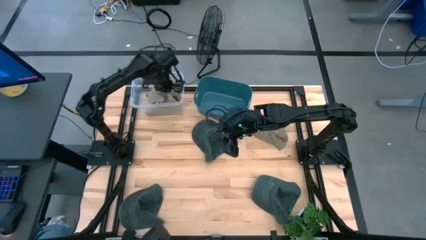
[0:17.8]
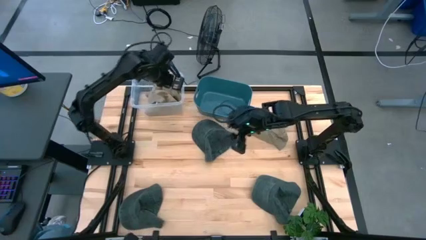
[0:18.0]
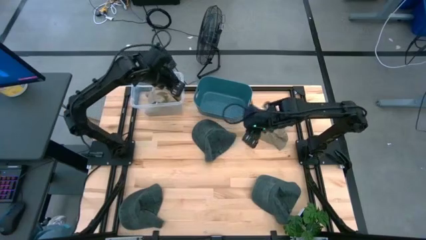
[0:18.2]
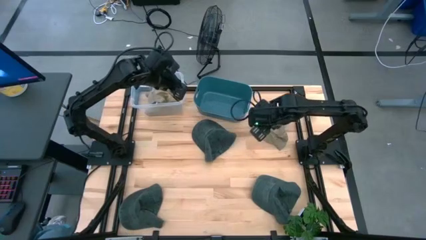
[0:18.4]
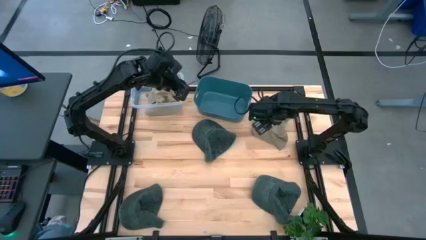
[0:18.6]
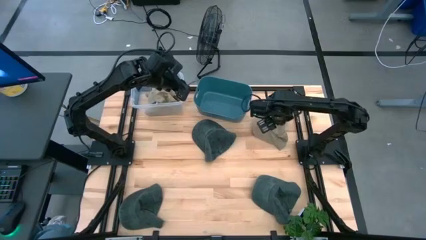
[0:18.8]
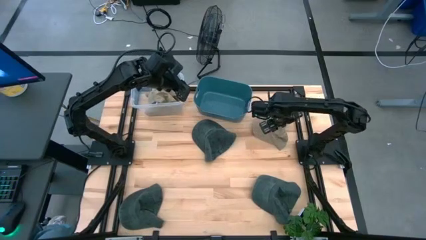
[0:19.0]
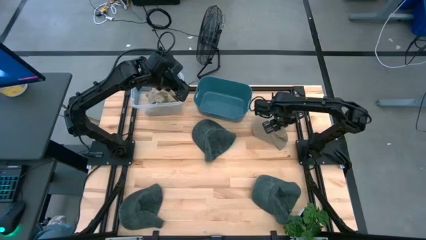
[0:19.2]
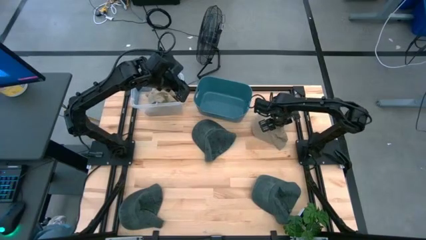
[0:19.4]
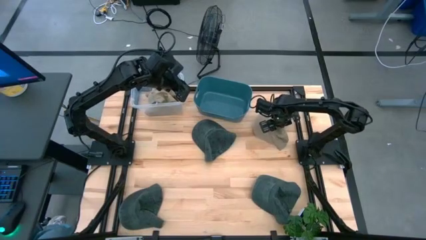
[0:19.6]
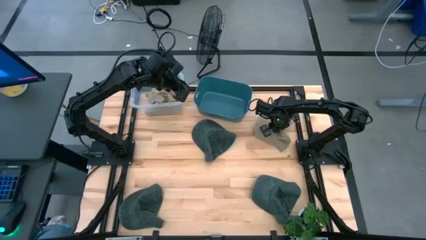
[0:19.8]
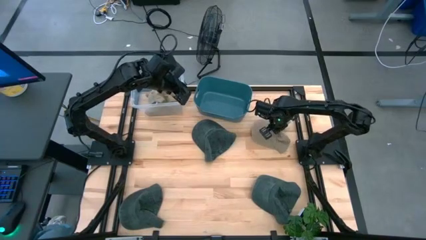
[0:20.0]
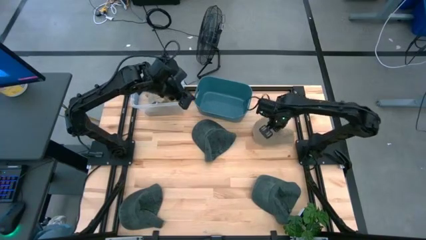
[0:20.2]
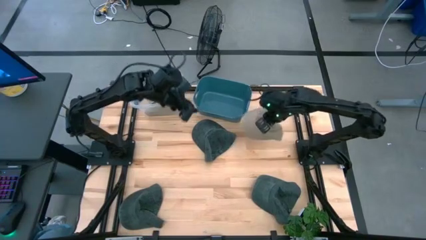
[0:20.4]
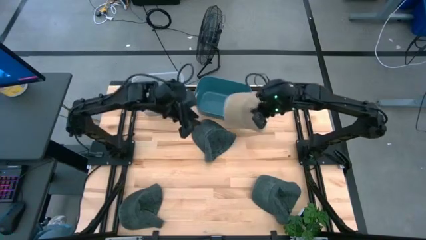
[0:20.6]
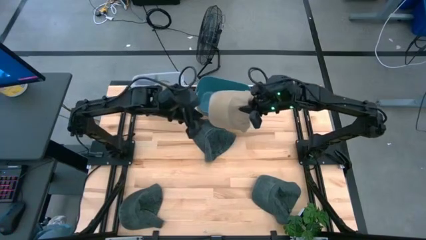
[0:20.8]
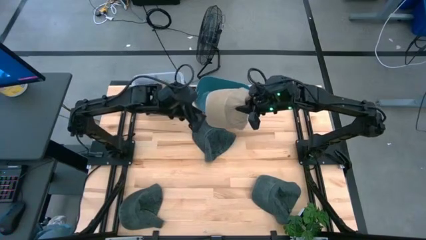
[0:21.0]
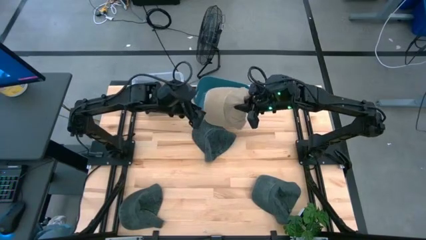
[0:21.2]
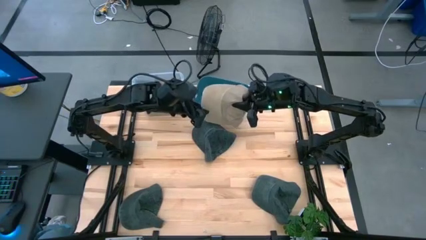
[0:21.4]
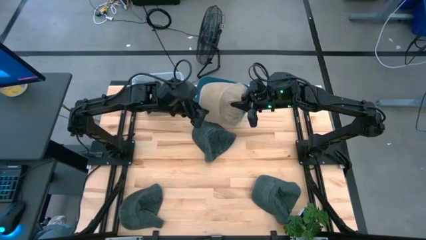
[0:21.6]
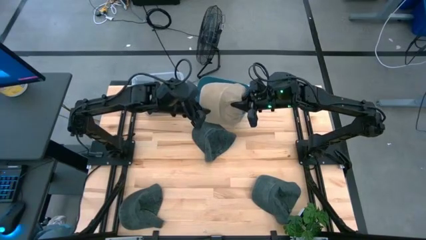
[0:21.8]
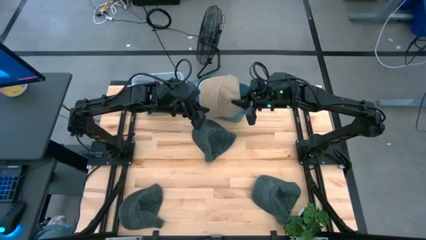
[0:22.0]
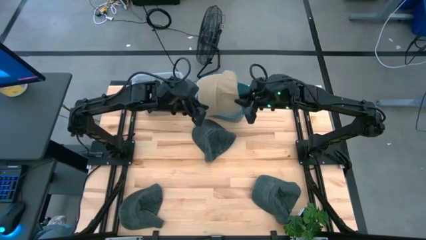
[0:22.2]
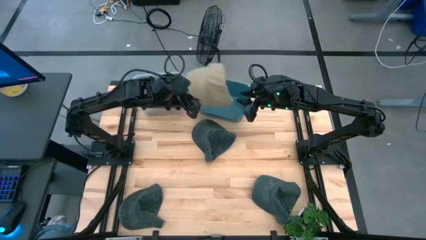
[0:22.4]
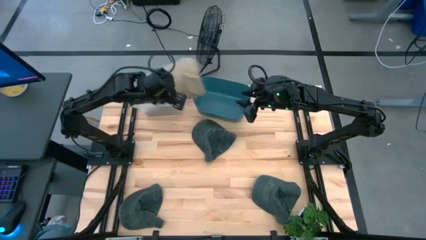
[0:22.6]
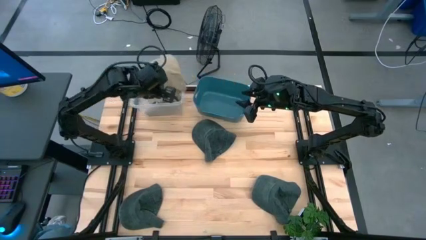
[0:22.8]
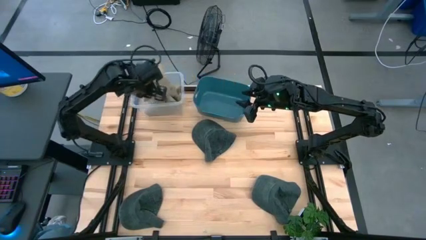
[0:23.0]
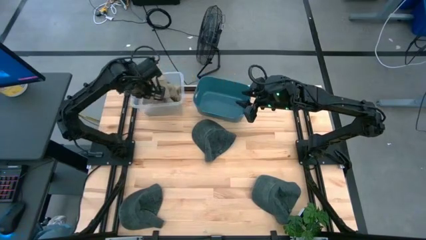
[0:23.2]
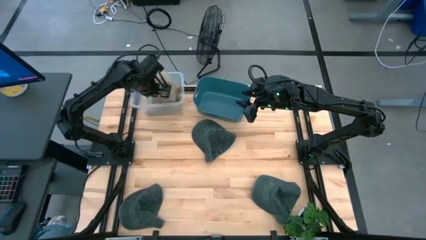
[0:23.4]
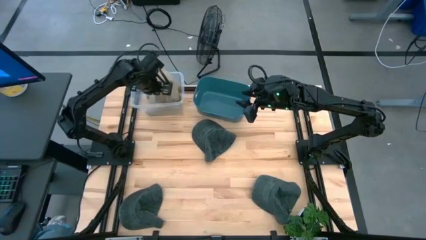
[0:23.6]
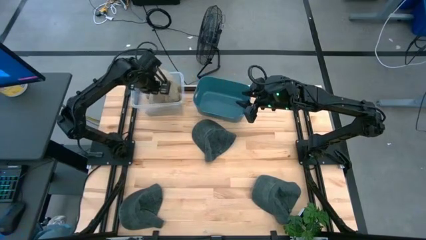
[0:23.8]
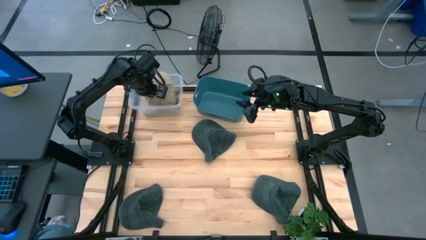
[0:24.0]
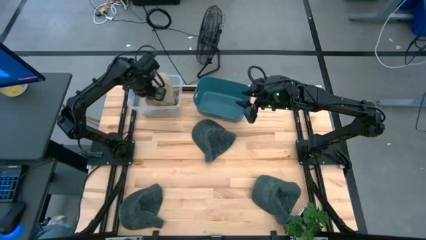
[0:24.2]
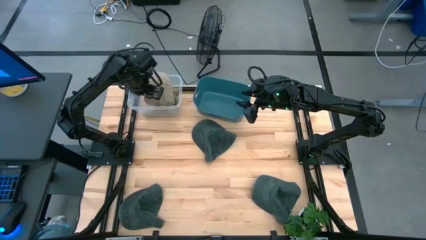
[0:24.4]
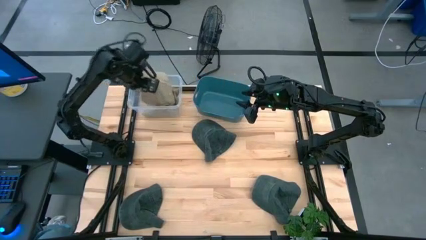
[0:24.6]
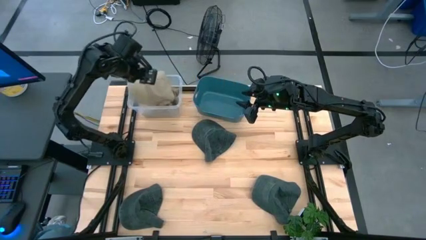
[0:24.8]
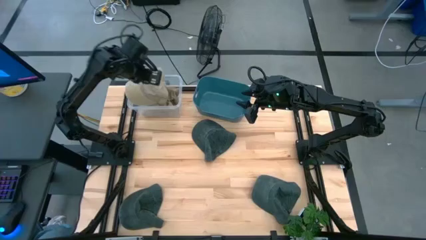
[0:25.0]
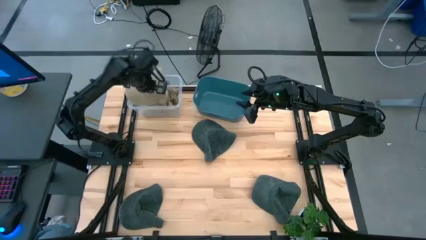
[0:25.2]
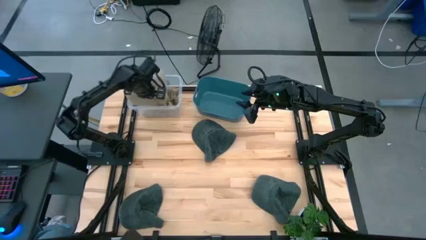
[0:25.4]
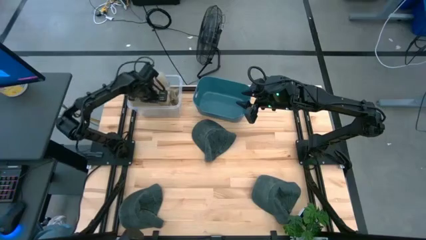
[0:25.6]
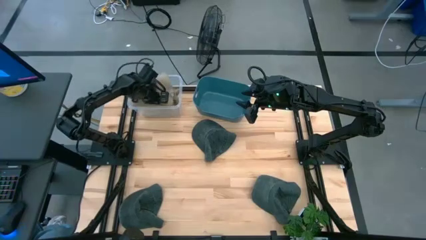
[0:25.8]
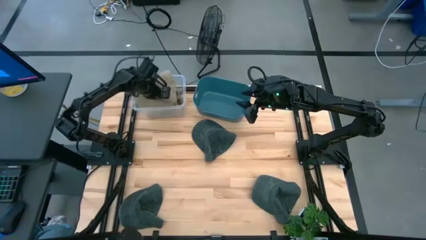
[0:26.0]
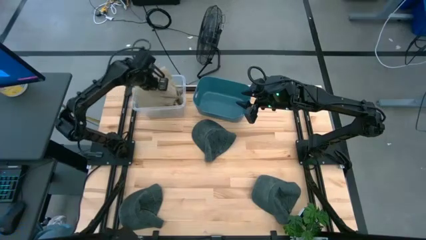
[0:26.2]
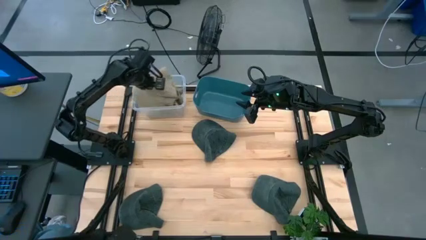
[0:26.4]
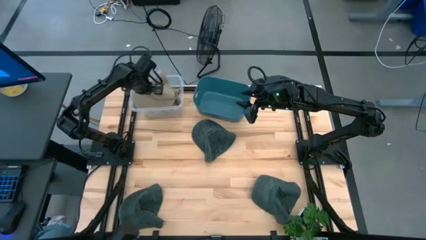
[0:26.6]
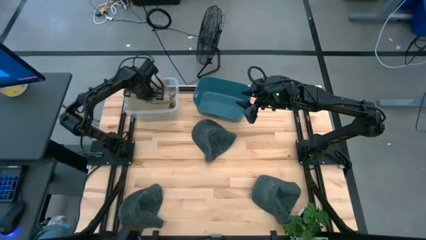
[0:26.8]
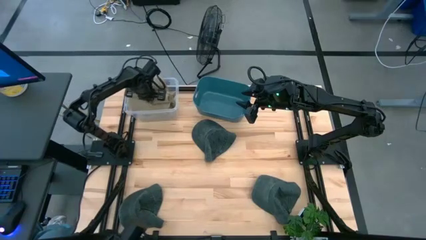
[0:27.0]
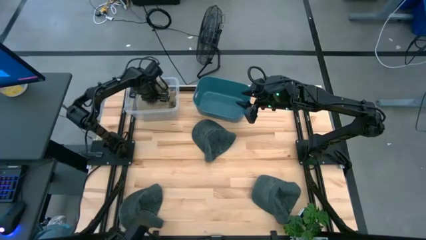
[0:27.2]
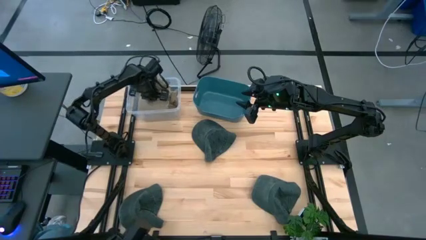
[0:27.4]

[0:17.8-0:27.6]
Task: Pick & Place hat
Put the brown cap into the transparent bin

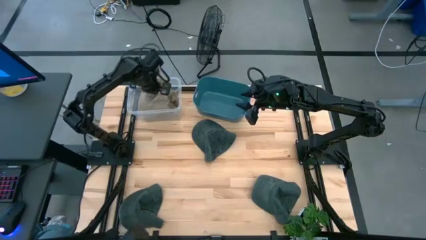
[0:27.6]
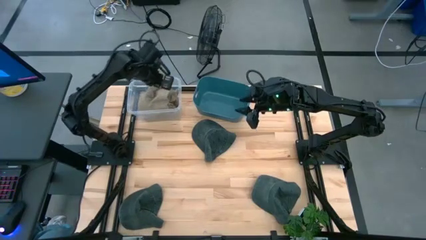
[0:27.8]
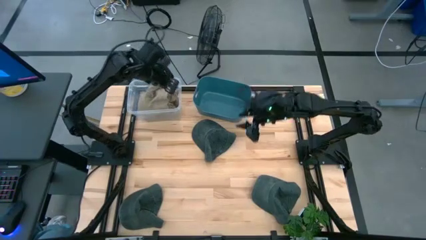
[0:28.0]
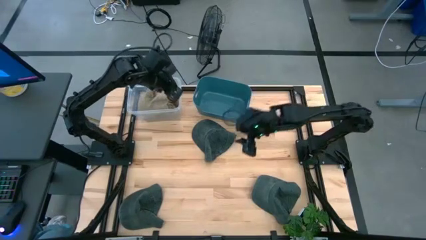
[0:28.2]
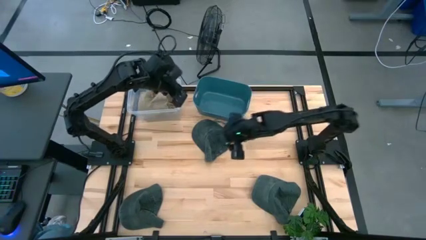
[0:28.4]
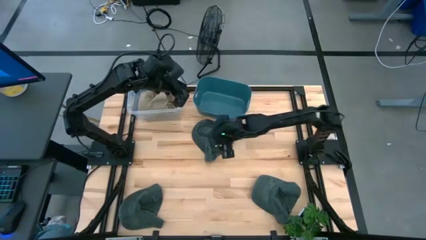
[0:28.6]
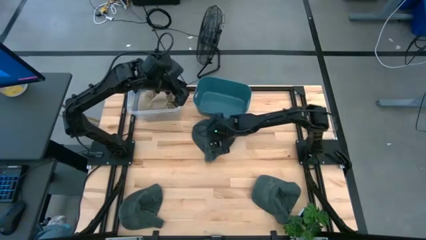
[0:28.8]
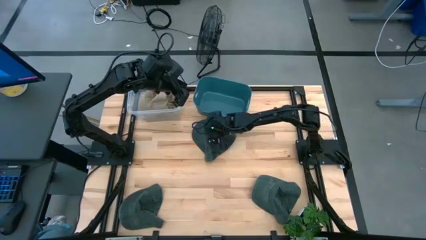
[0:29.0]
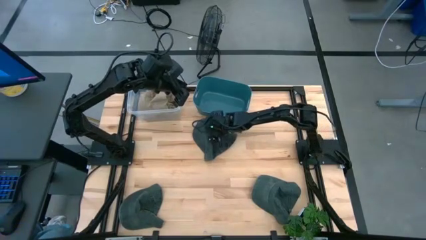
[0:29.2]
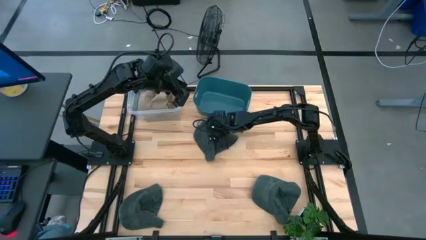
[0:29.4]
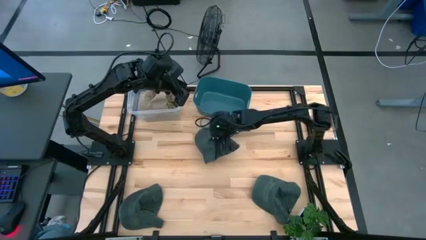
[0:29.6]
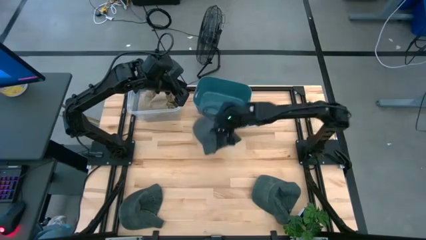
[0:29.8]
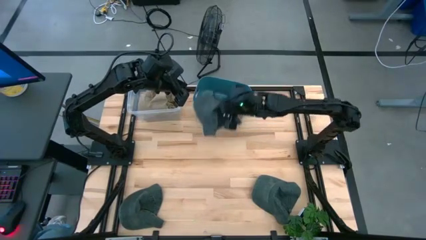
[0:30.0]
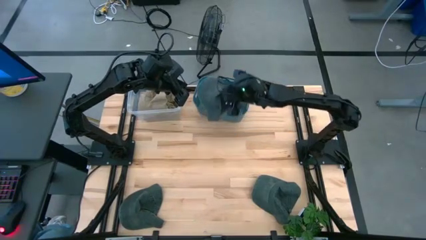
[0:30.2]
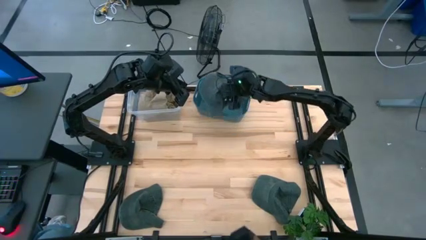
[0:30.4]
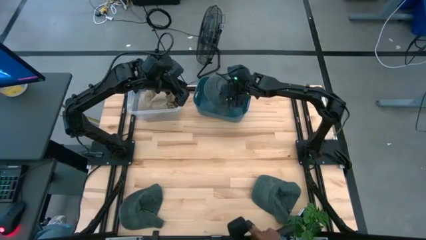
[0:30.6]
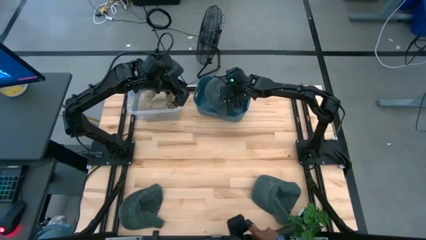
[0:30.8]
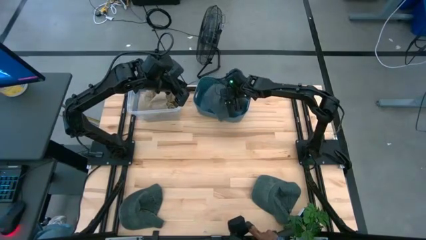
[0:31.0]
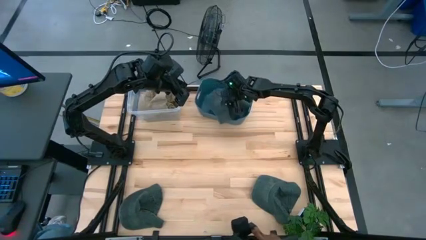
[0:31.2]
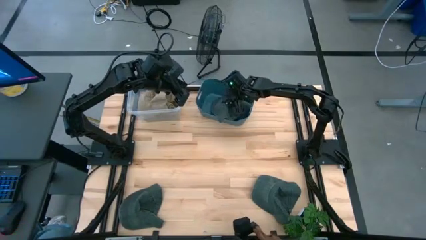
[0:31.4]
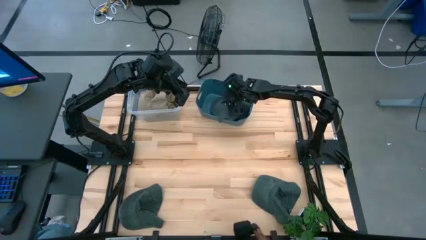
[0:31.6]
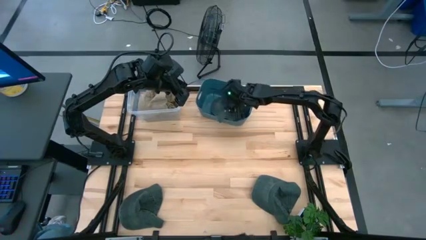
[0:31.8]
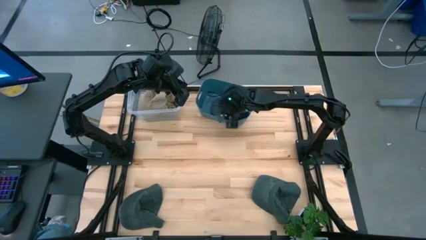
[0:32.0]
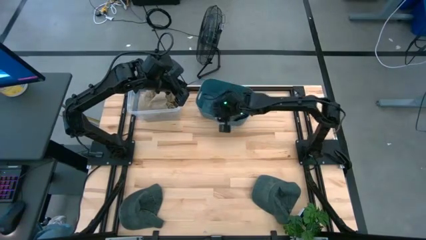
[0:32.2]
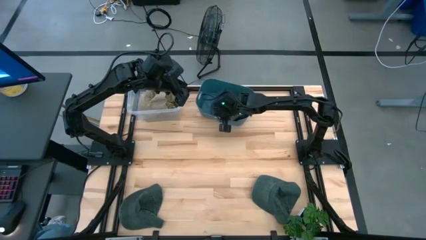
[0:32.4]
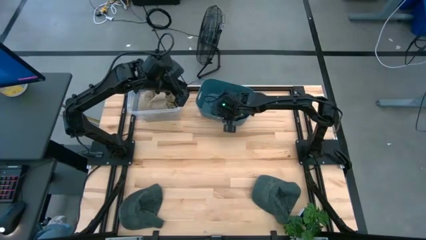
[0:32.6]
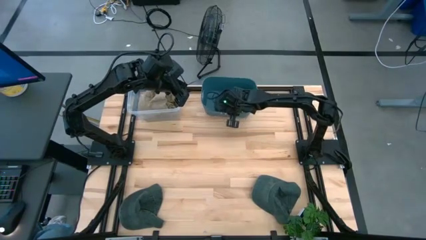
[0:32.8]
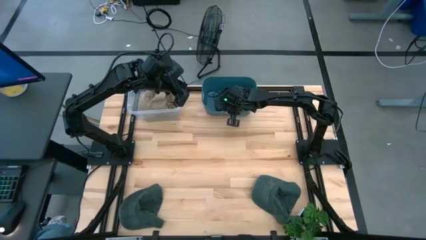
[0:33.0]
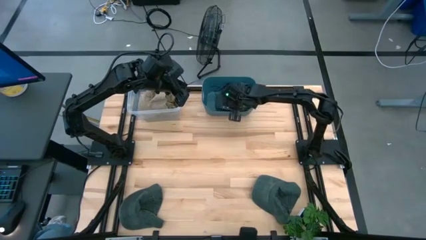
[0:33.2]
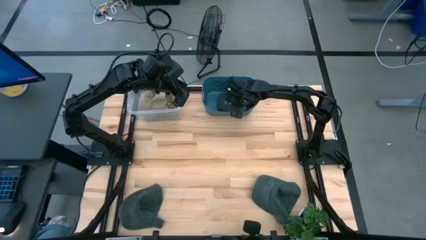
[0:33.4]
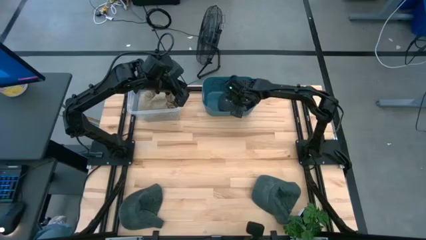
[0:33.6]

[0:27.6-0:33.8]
Put the top middle gray cap into the green bin
